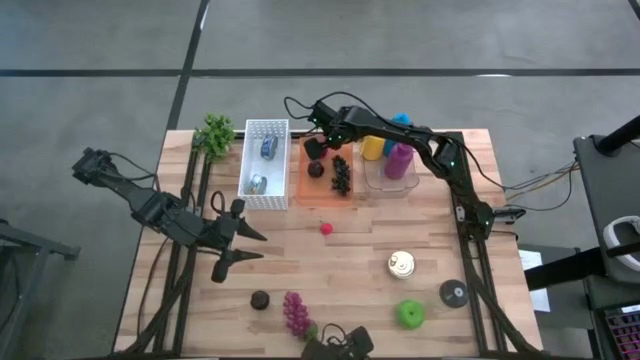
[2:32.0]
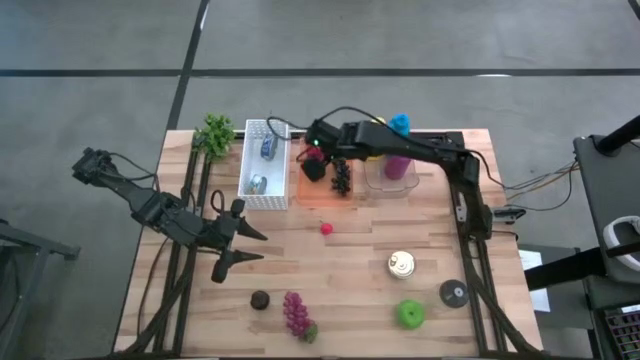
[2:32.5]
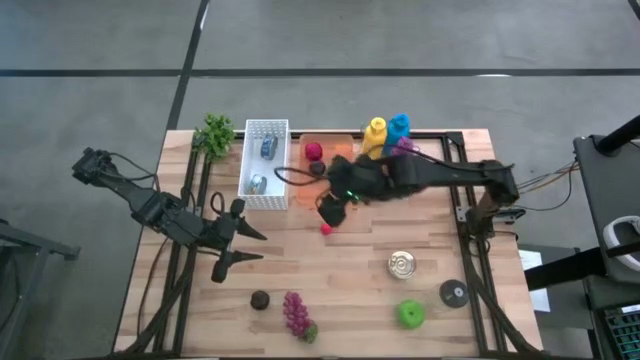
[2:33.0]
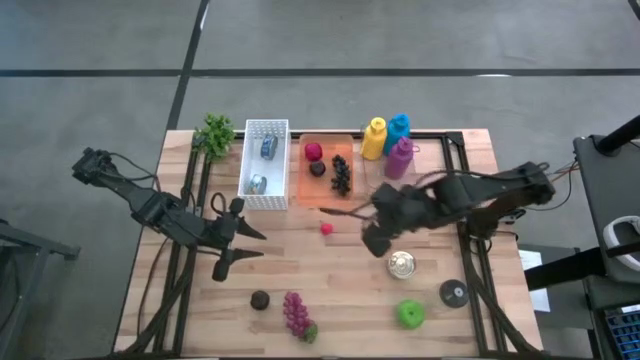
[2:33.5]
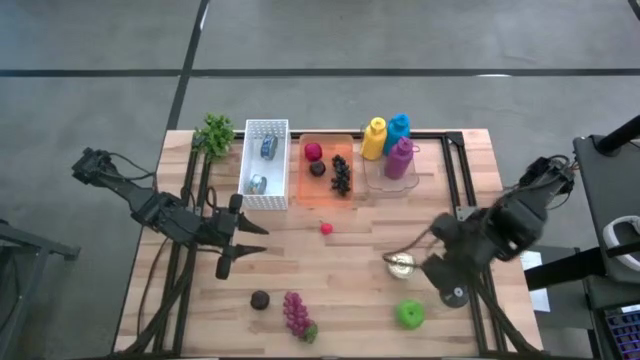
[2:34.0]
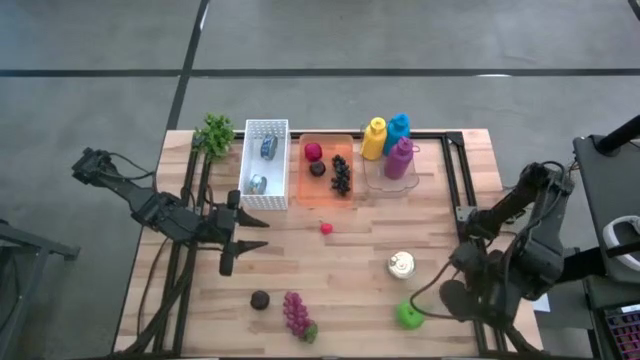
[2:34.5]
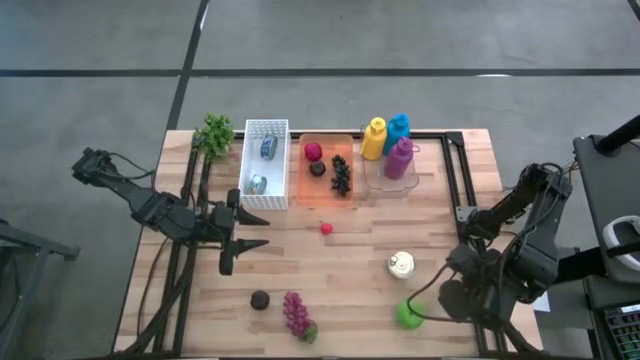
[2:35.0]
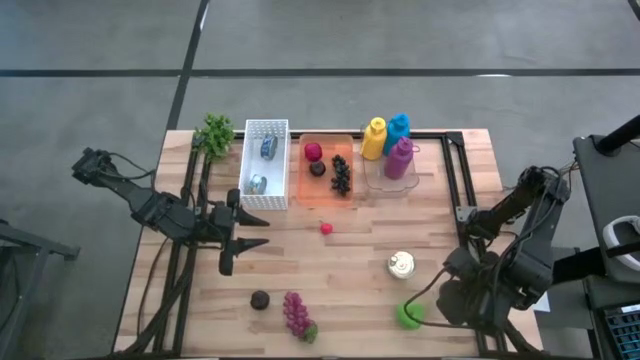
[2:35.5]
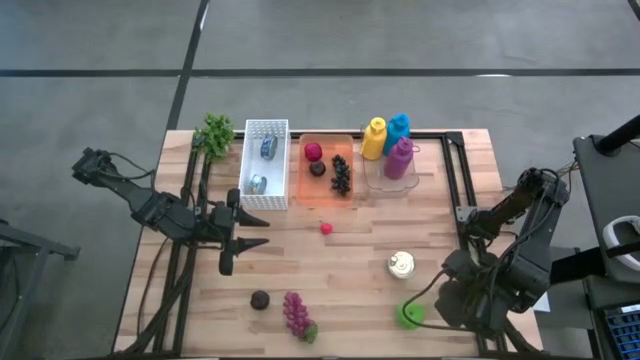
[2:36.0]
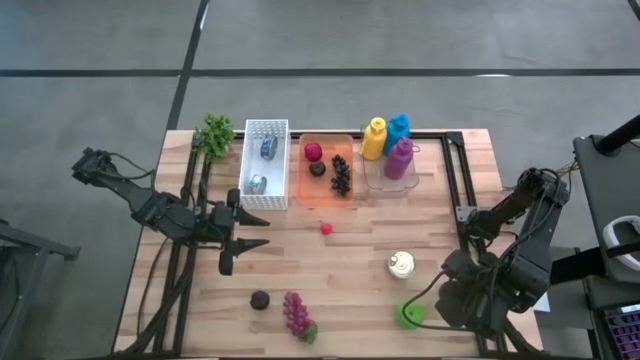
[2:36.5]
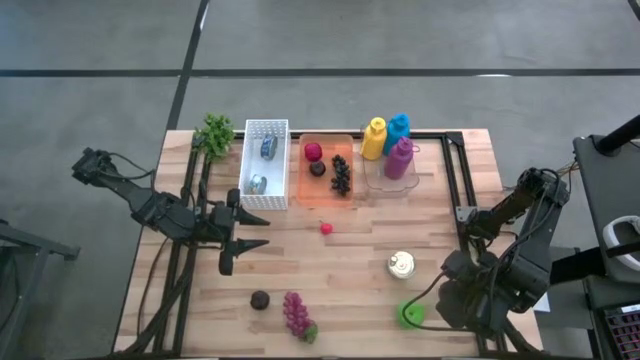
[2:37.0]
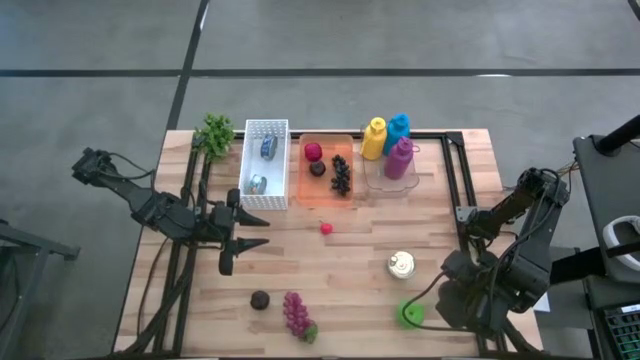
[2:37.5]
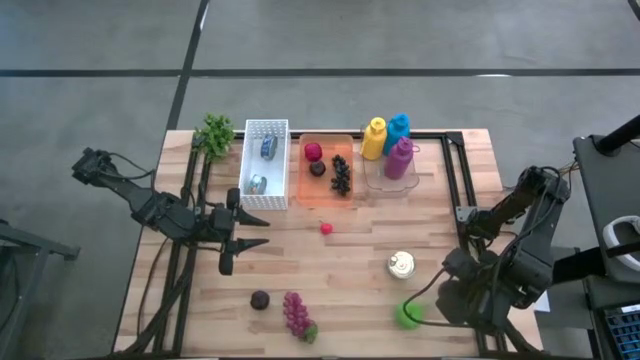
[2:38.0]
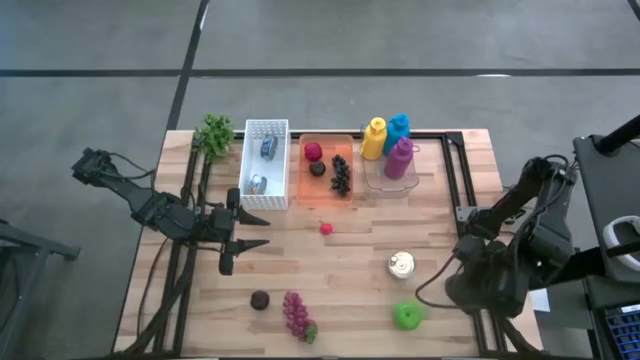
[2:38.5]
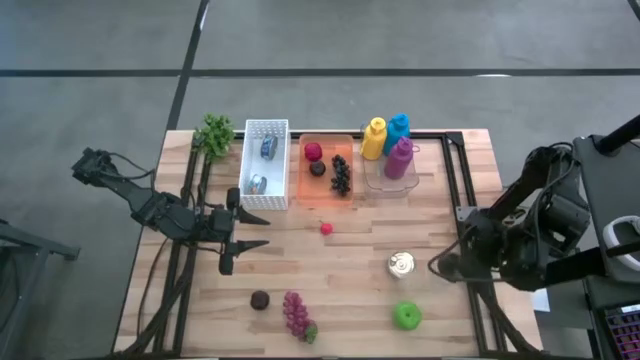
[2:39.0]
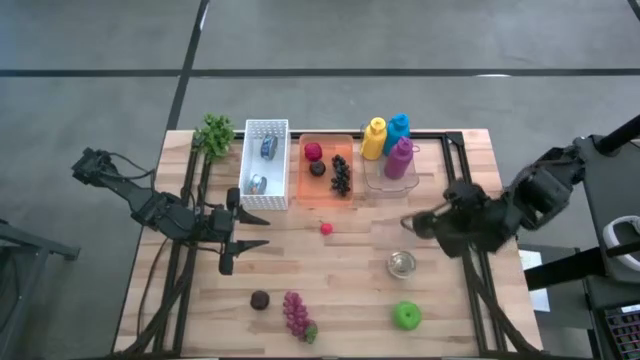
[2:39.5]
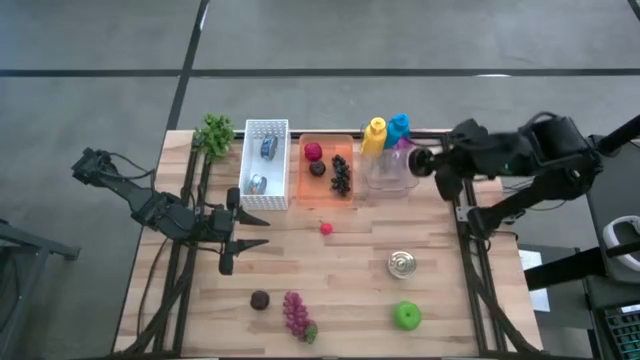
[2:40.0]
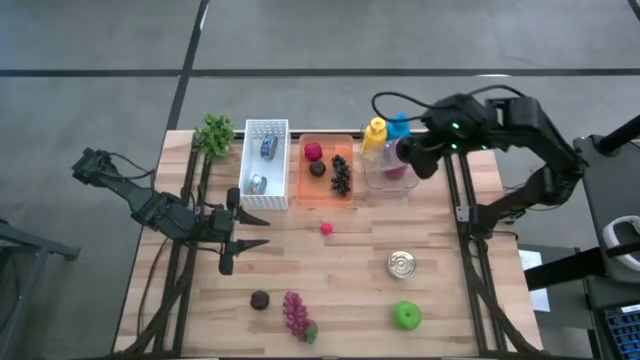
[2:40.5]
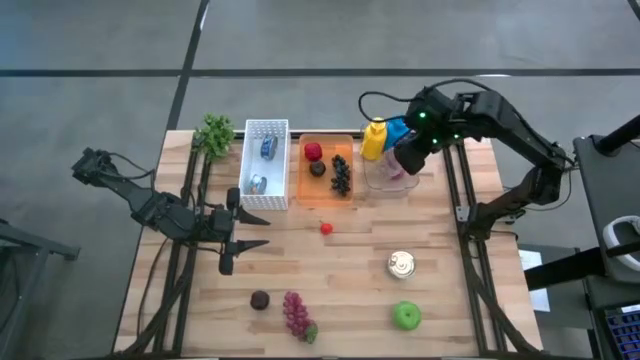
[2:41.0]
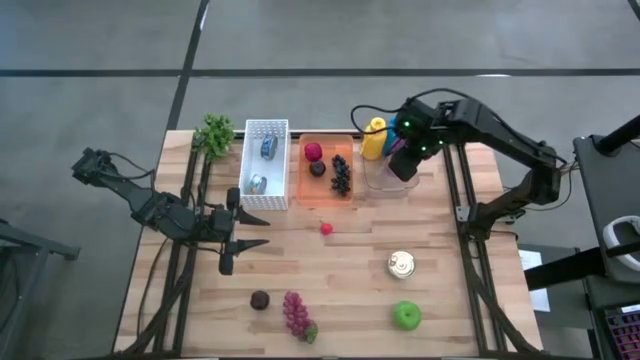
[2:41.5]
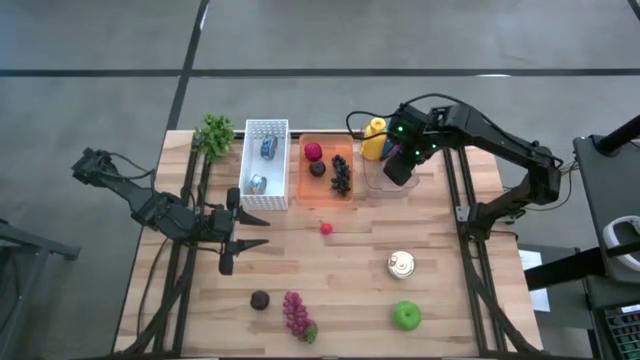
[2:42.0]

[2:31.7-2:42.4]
Task: Pick & Place Food Item
Put the transparent tumbler into the transparent bin

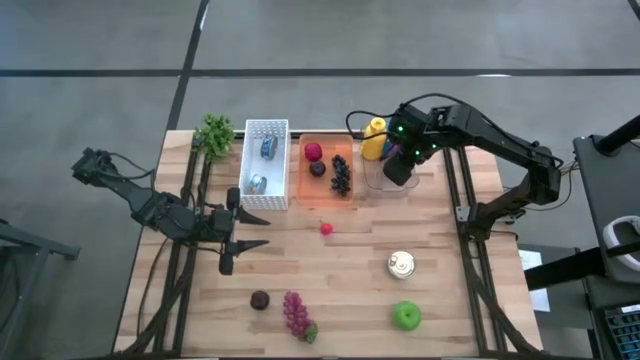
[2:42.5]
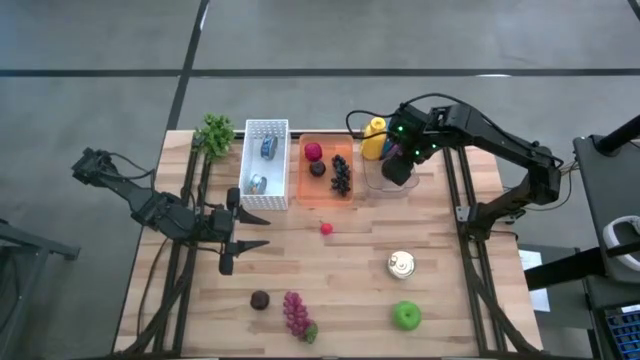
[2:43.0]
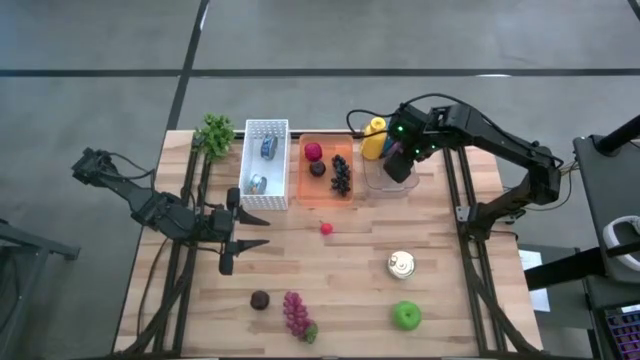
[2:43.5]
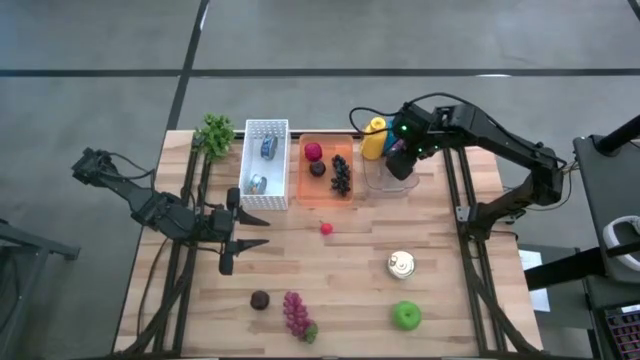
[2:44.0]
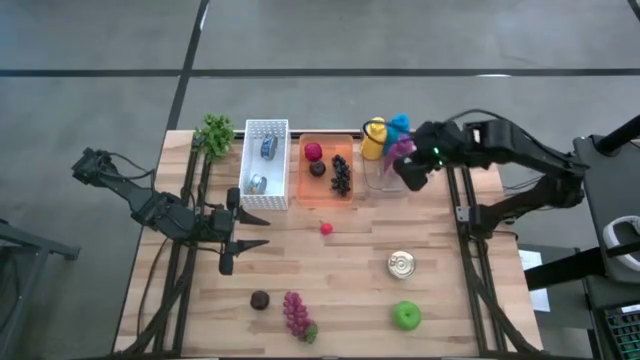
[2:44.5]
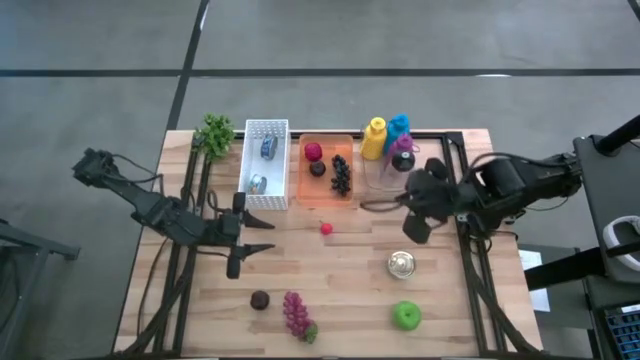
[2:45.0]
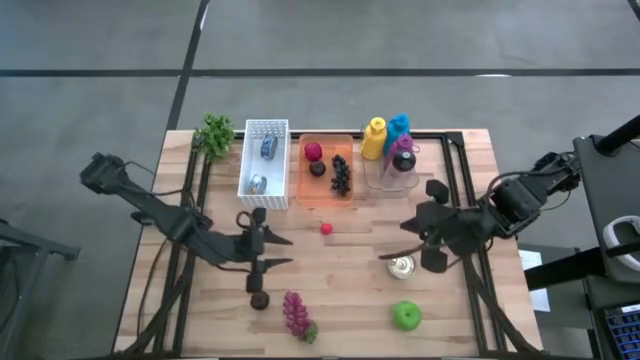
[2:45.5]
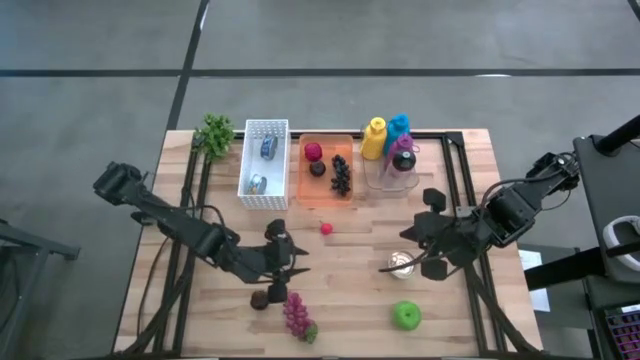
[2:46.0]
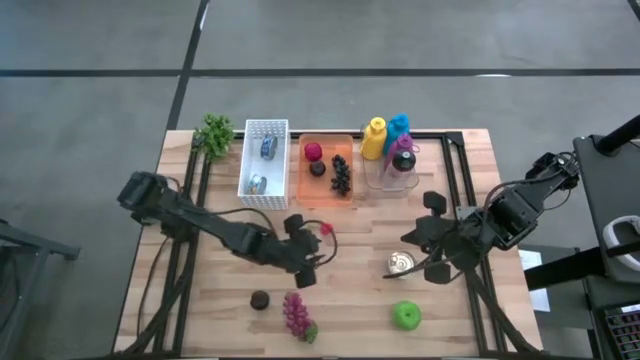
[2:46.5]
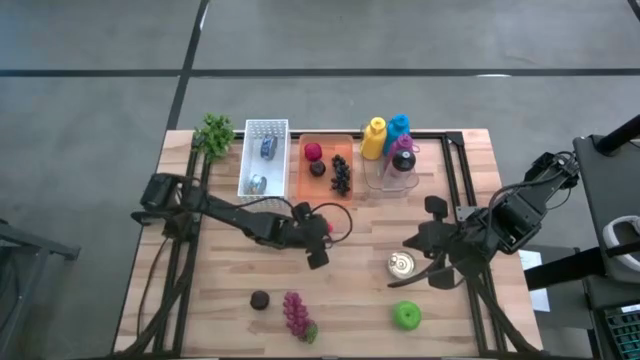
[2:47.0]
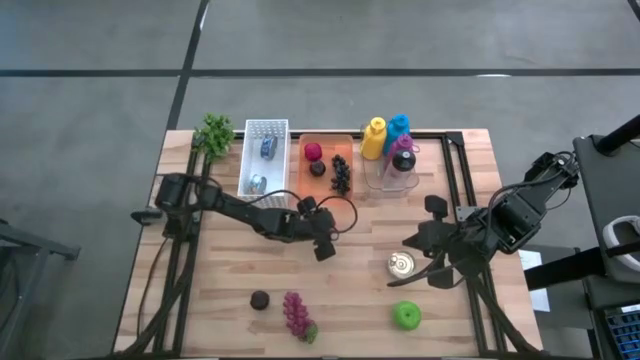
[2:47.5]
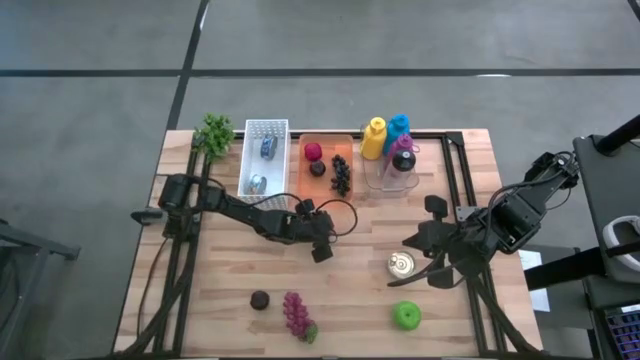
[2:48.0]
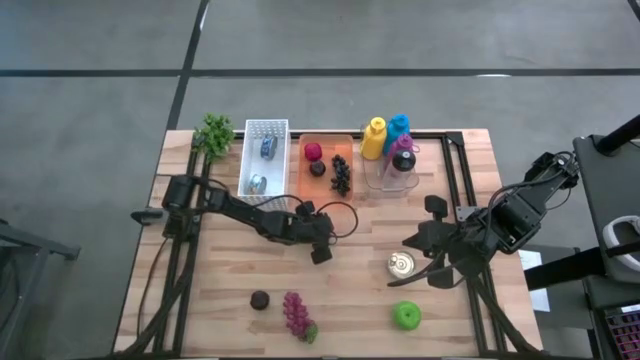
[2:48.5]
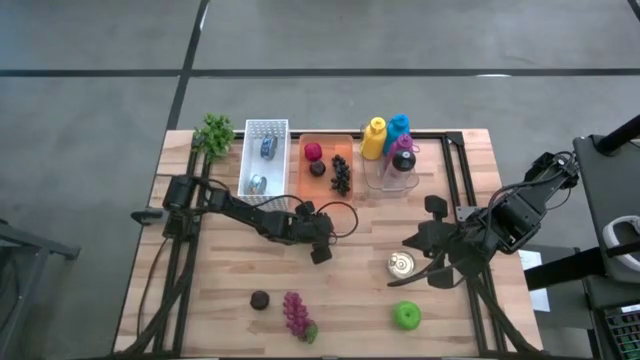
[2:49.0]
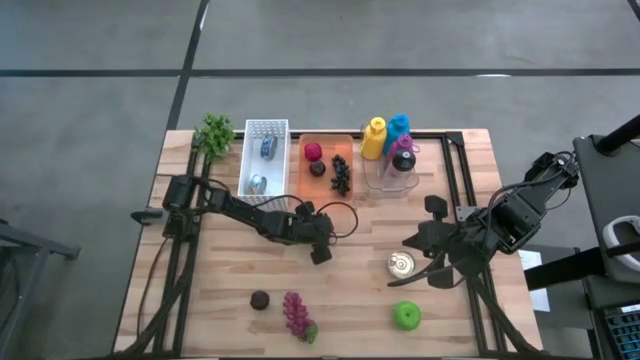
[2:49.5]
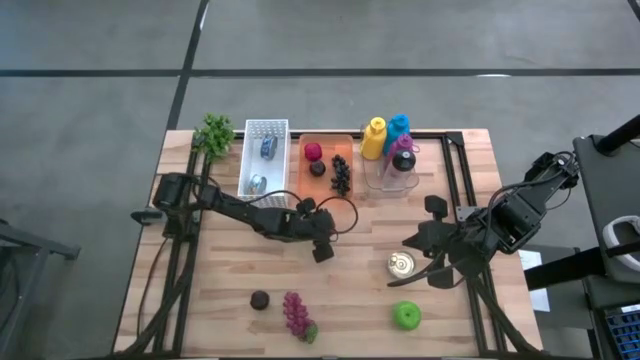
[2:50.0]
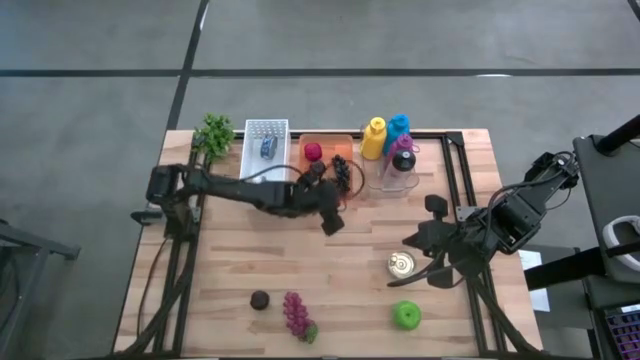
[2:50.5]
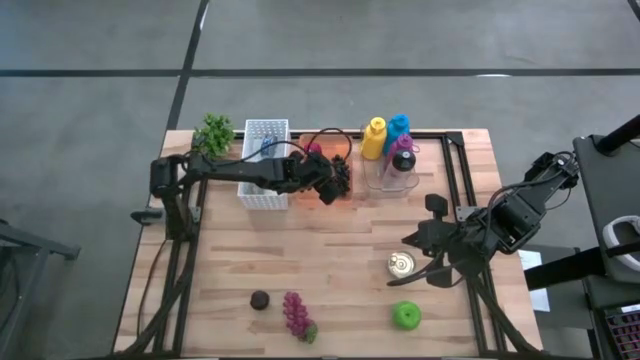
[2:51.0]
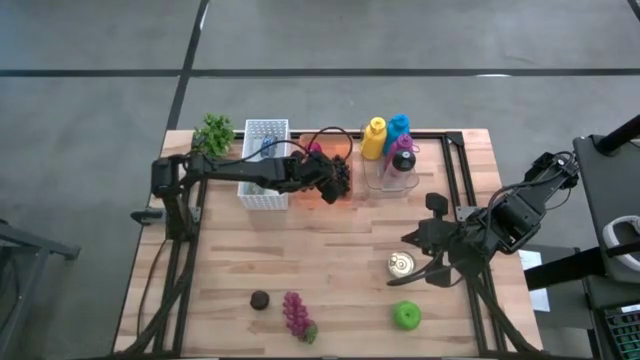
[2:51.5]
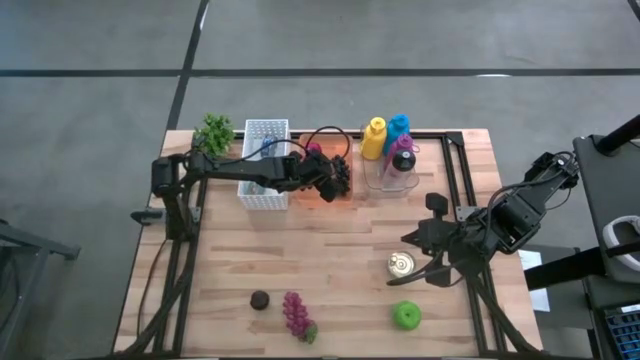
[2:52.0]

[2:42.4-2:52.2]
Put the strawberry into the orange bin

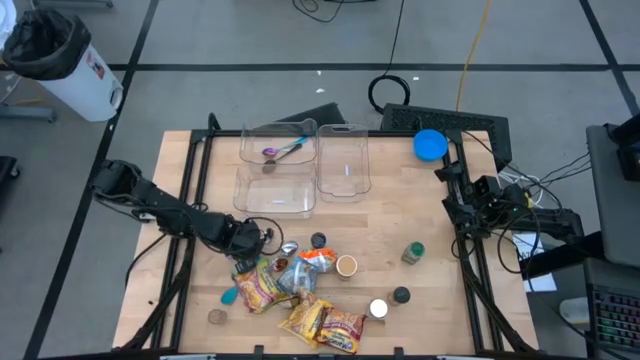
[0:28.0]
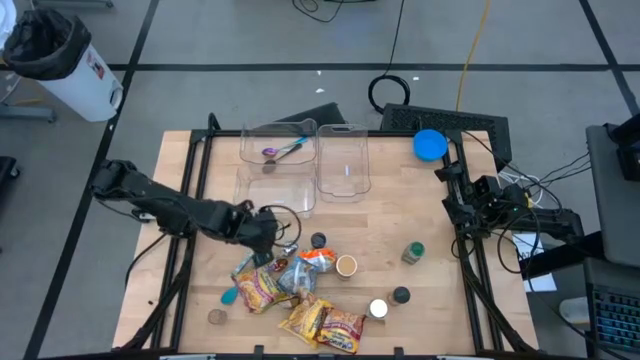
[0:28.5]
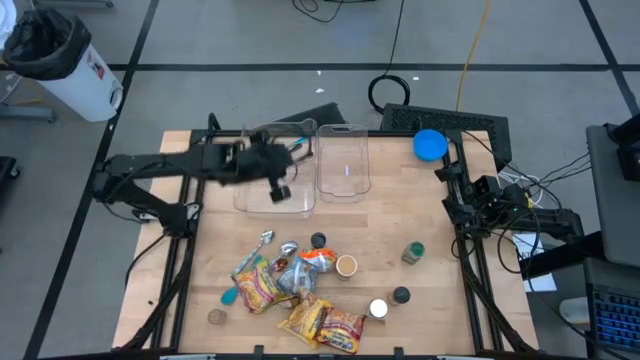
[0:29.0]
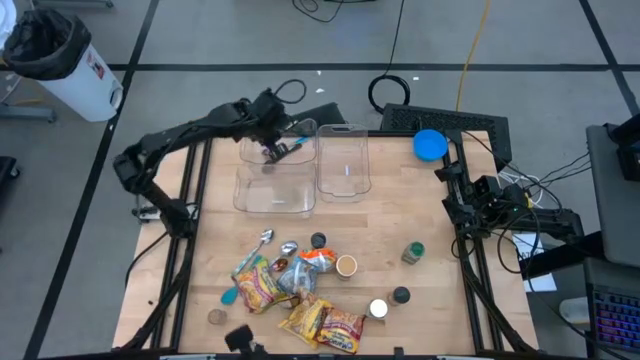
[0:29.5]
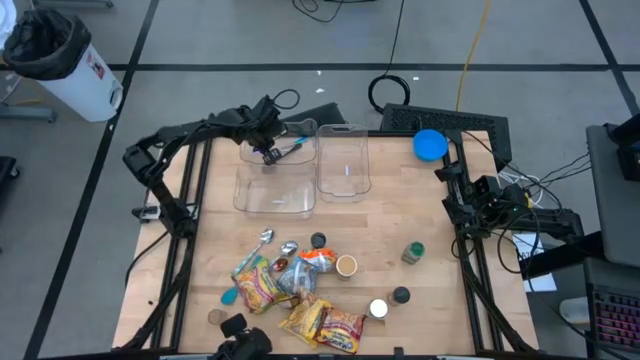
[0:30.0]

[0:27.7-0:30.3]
Task: Pick & Place Food Item
Put the left blue spoon into the top left transparent bin
